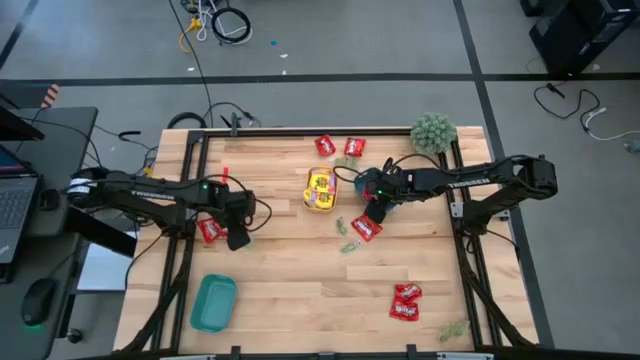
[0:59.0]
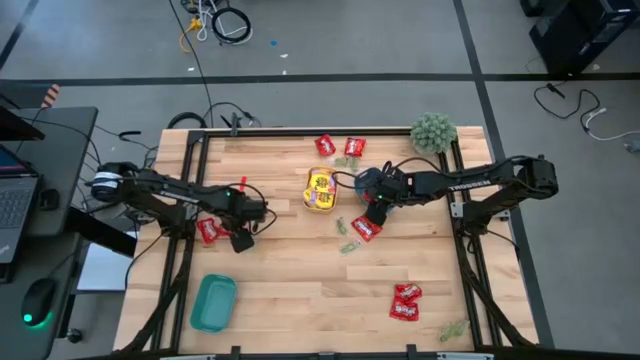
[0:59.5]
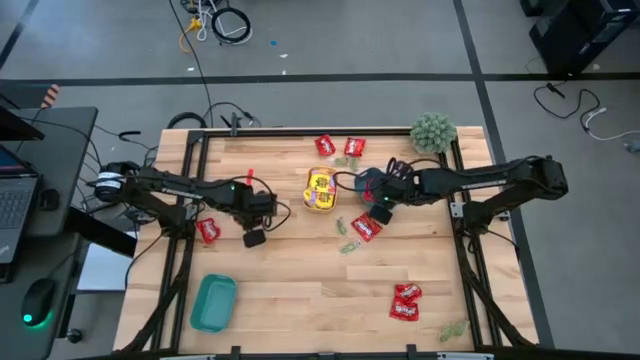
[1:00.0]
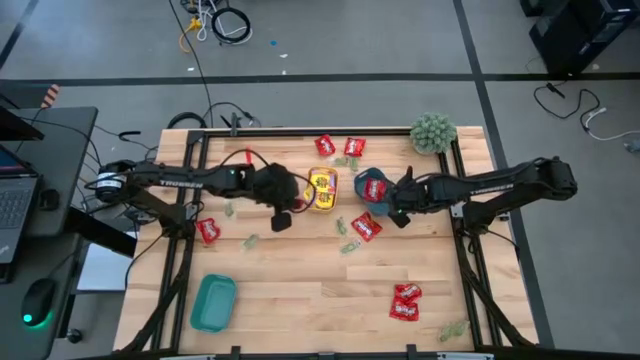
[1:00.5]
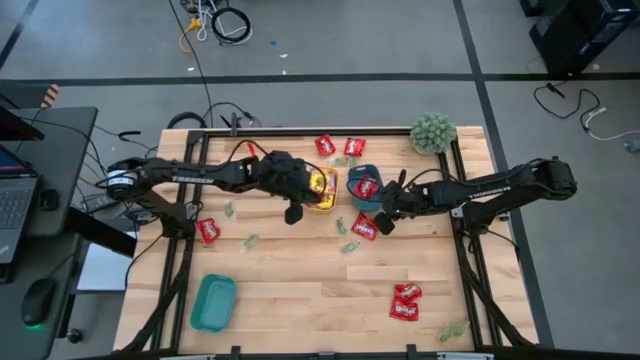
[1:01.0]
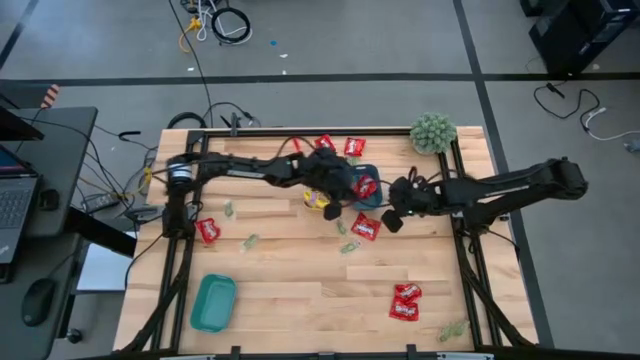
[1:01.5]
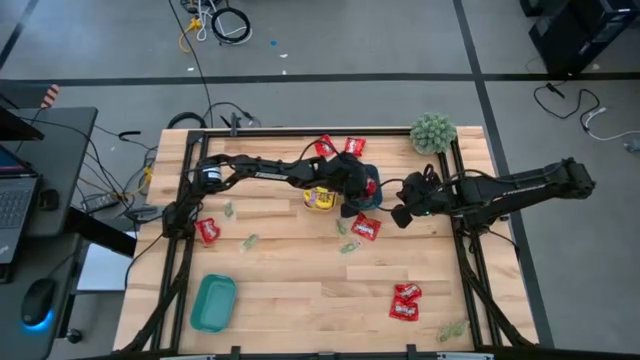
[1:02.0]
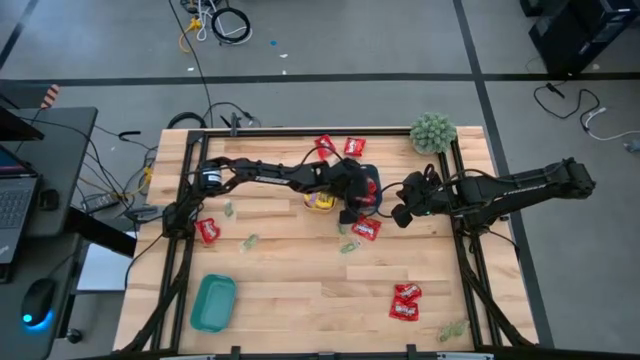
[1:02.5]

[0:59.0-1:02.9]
Task: Sort candy
Put the red packet of candy into the blue bin

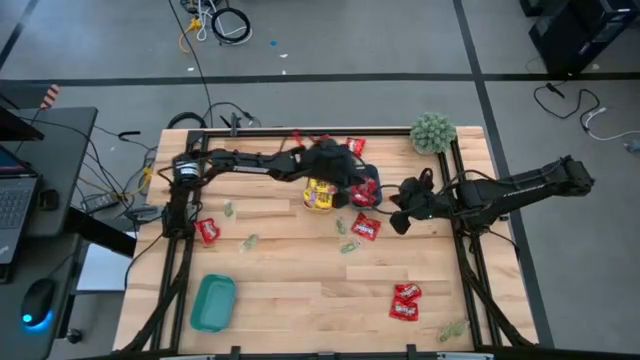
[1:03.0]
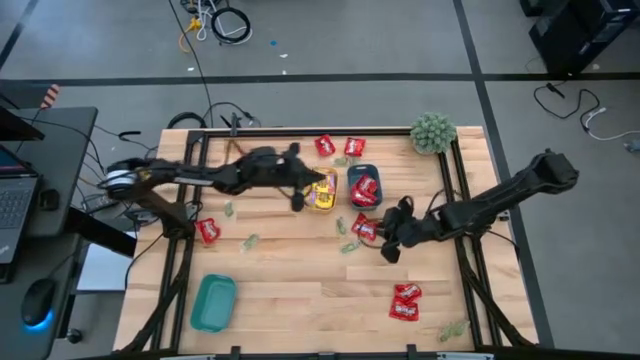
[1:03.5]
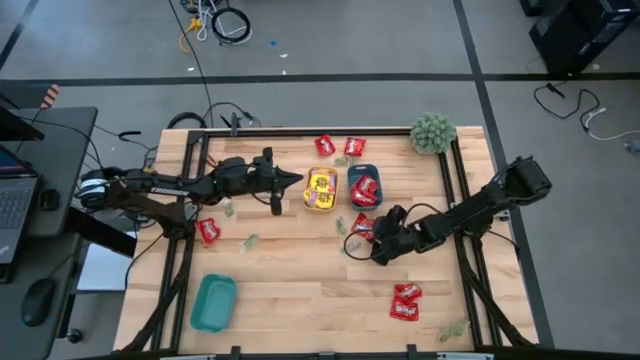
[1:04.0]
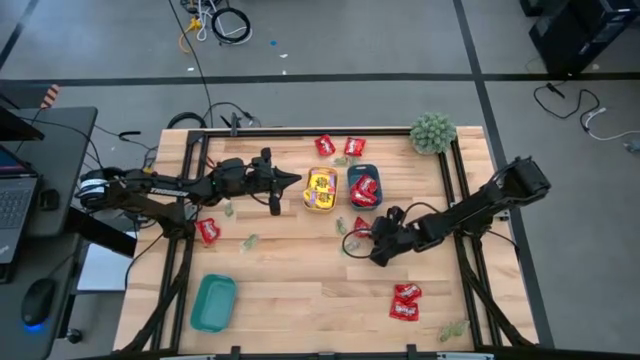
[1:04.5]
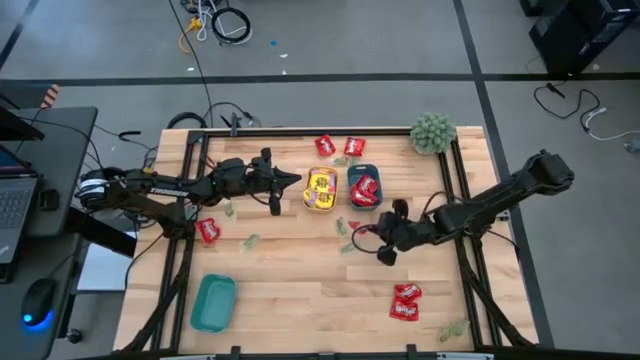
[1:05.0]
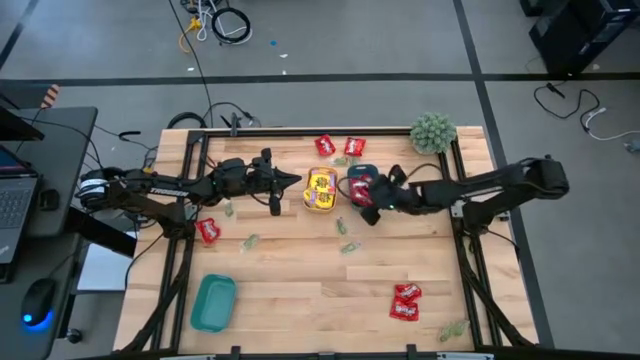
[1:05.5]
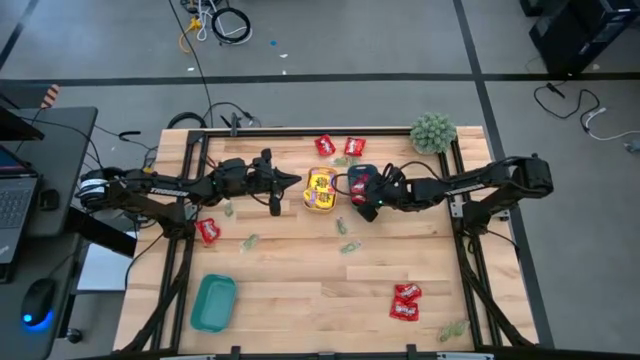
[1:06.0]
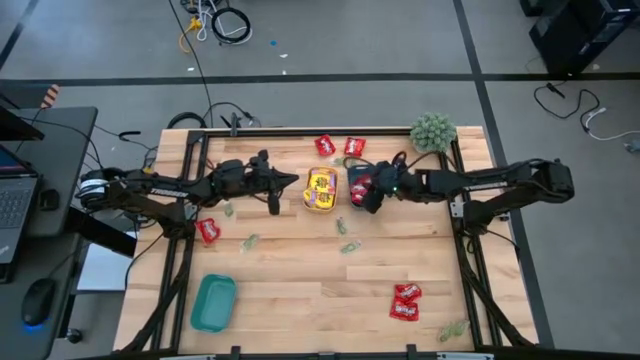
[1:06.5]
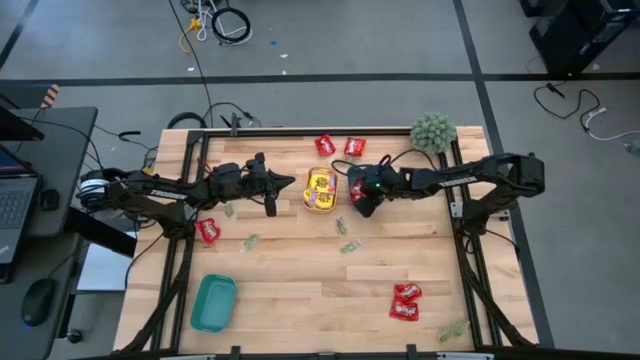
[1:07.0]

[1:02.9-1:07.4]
Put the red packet of candy into the blue bin

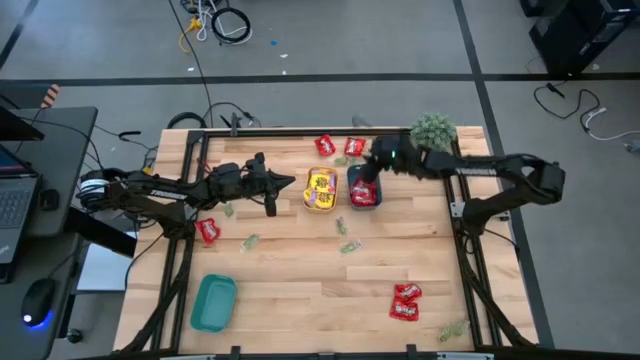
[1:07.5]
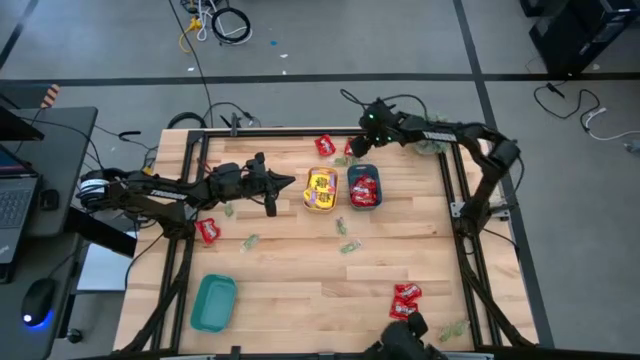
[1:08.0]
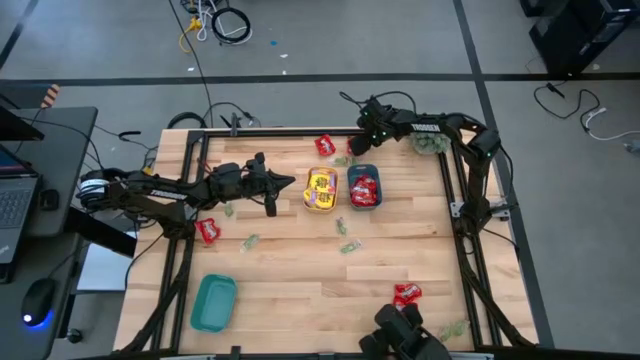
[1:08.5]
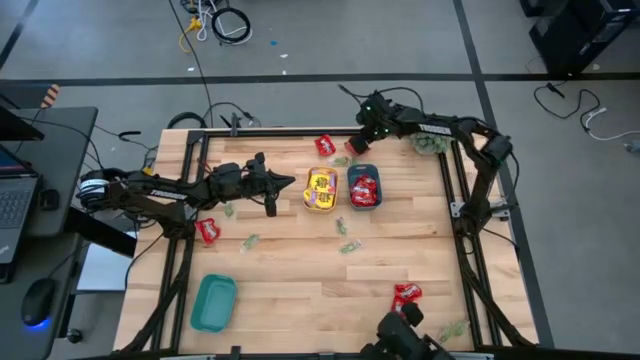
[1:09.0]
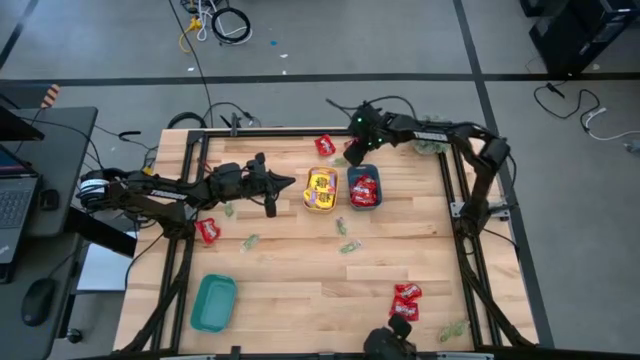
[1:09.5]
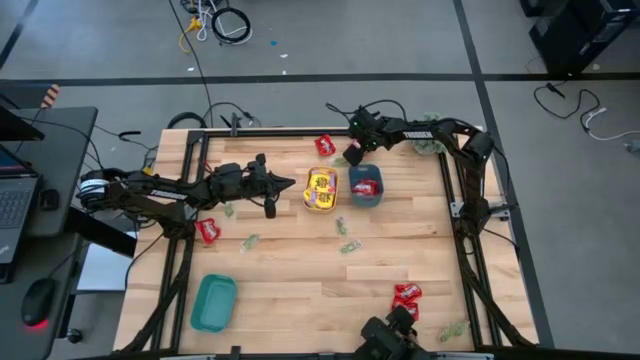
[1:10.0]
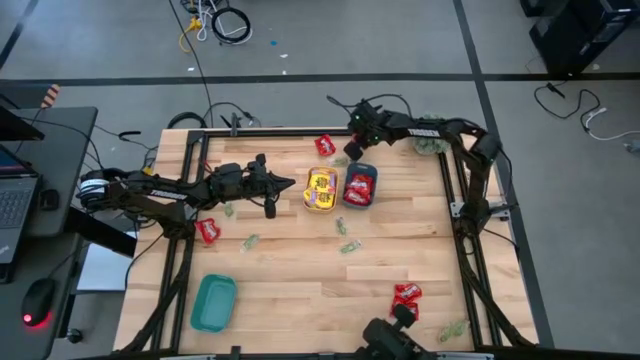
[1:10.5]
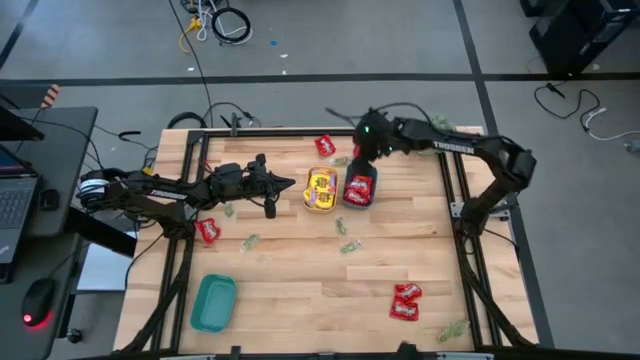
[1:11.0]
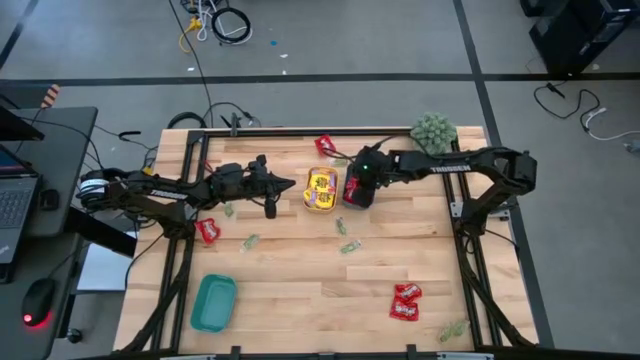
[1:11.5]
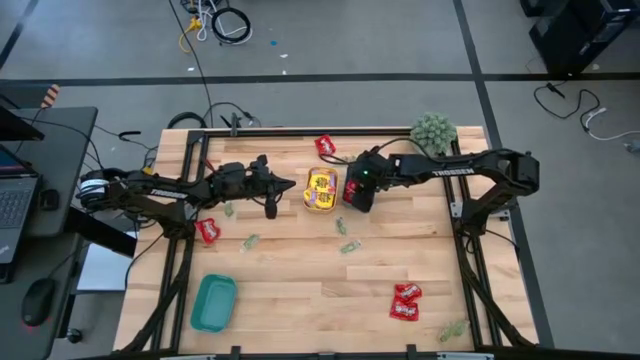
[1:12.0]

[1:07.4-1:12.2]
Put the red packet of candy into the blue bin

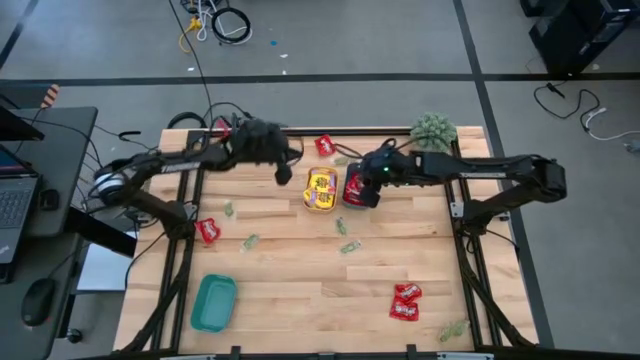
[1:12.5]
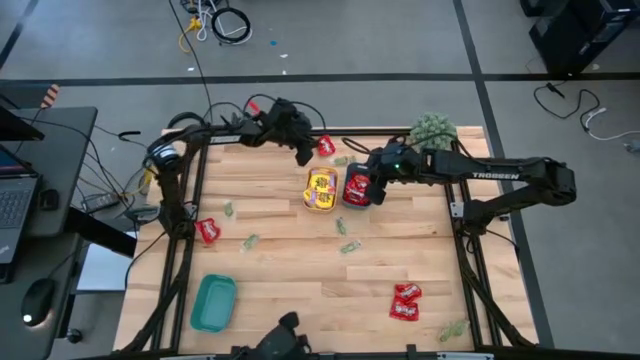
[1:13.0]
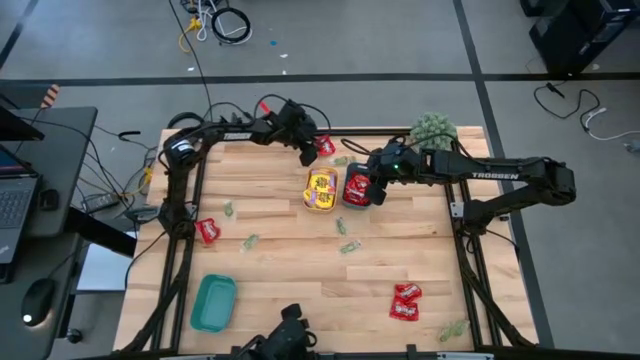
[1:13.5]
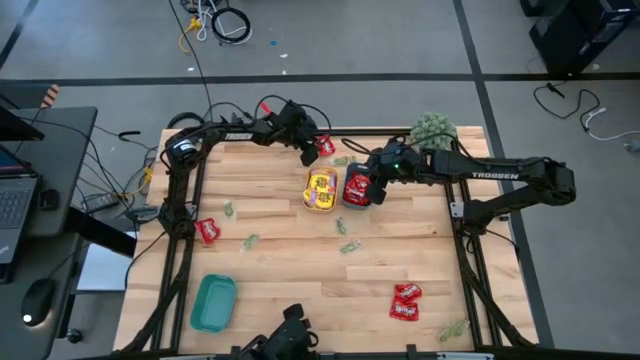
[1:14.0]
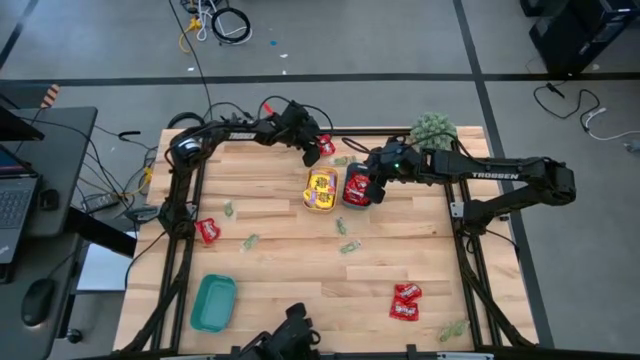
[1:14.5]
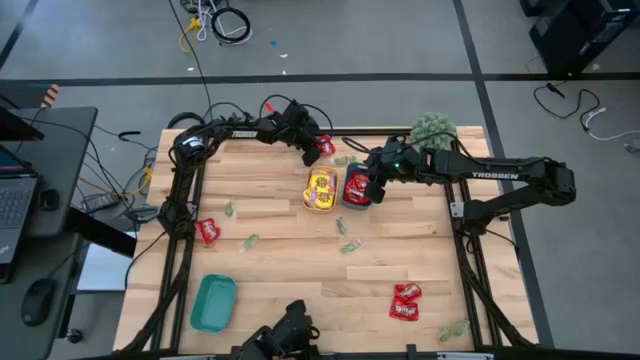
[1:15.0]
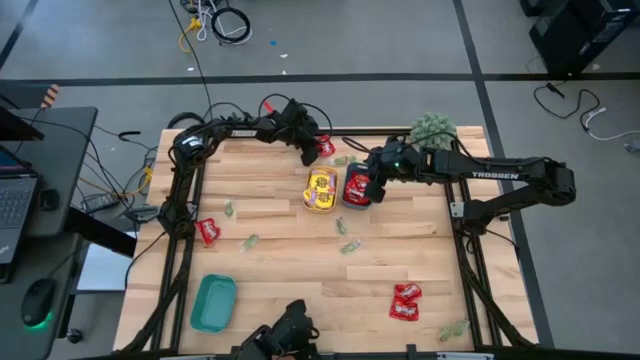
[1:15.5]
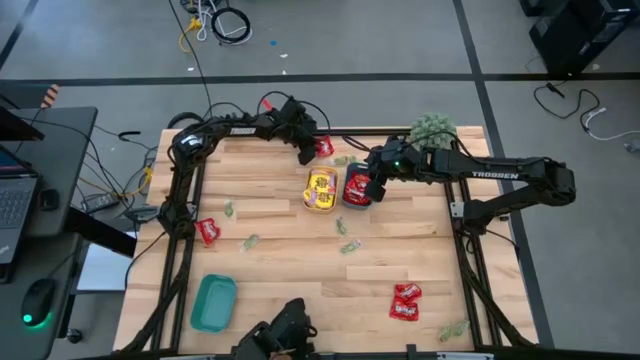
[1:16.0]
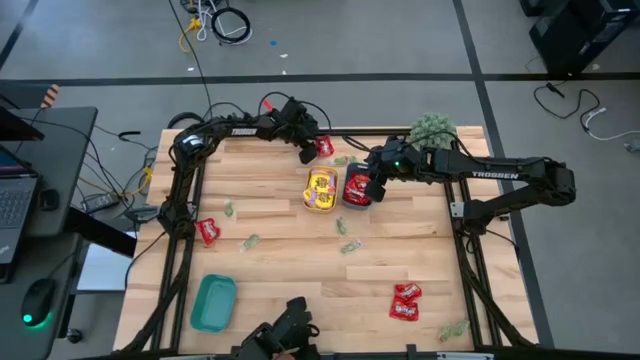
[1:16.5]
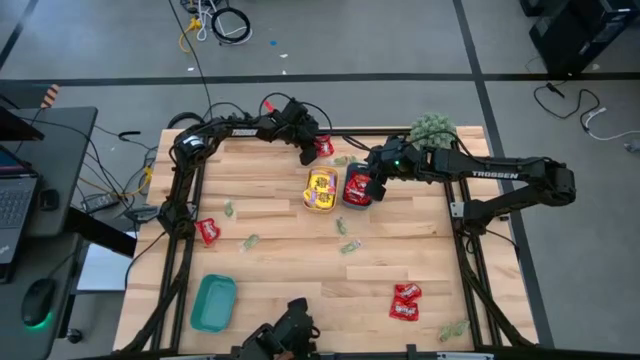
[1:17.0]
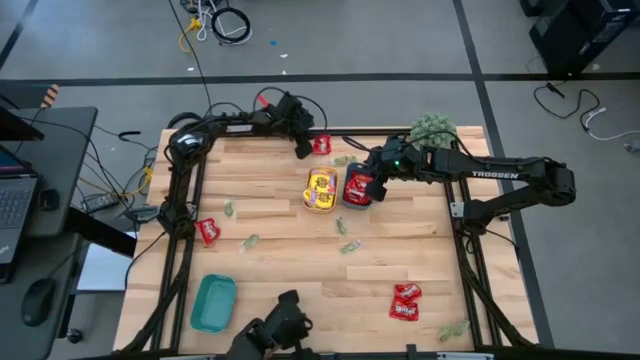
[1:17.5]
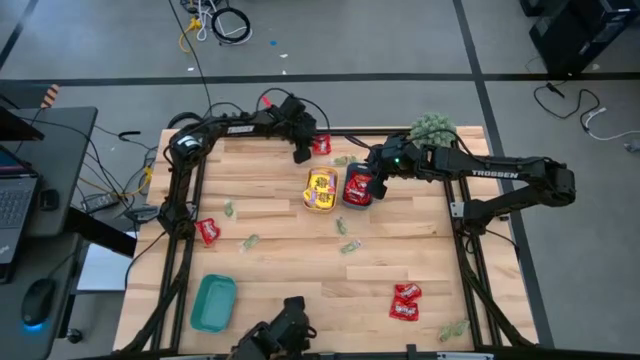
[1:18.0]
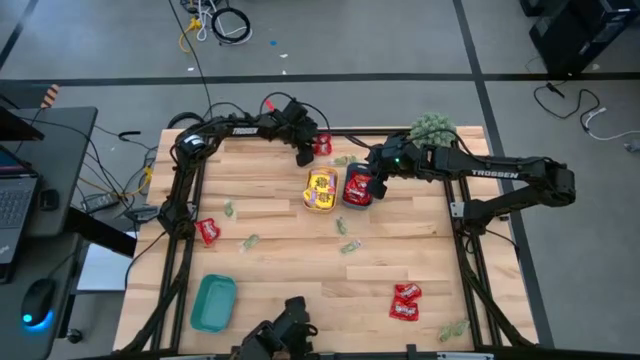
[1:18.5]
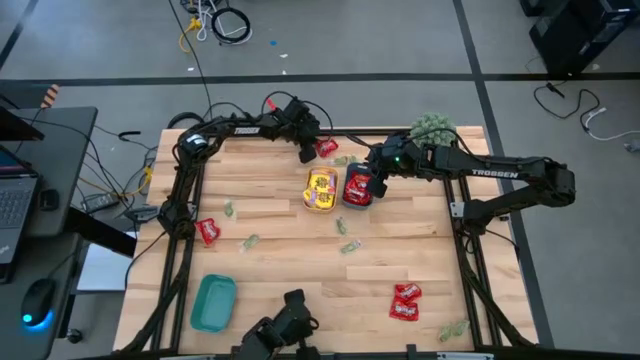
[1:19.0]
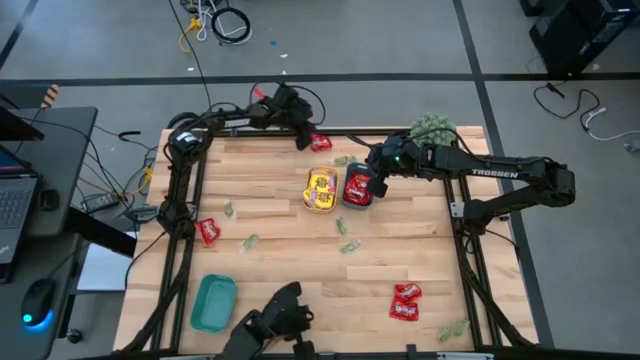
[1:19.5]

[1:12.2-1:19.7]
Put the red packet of candy into the blue bin
